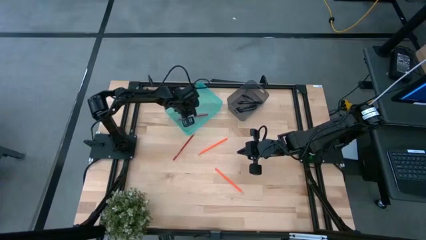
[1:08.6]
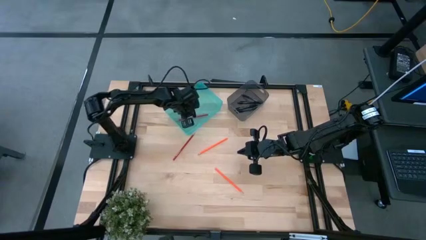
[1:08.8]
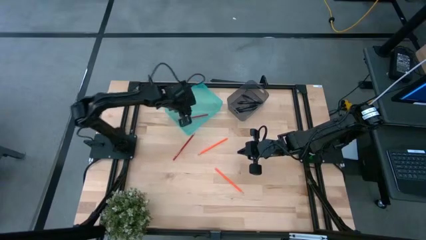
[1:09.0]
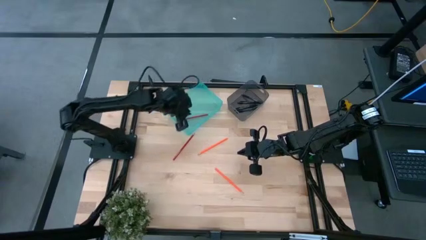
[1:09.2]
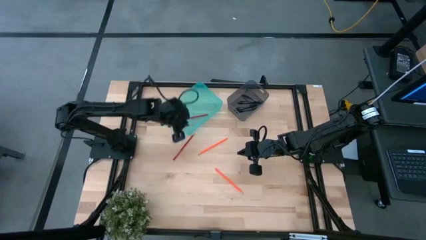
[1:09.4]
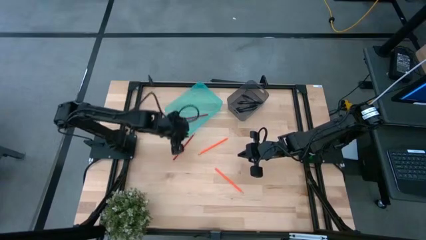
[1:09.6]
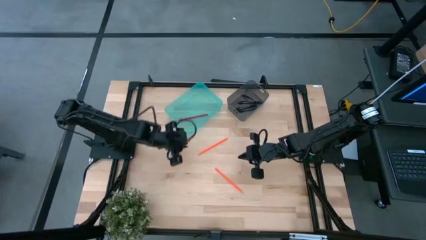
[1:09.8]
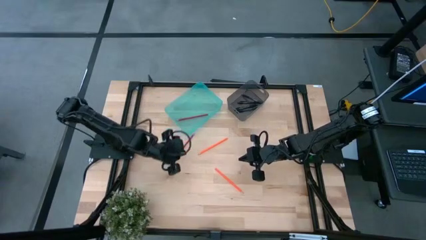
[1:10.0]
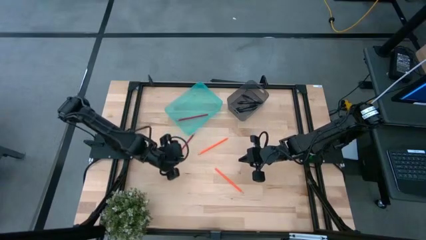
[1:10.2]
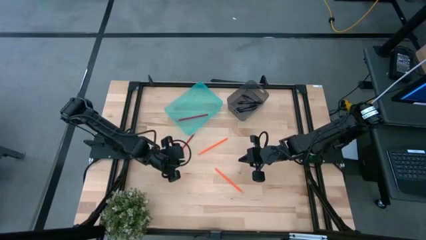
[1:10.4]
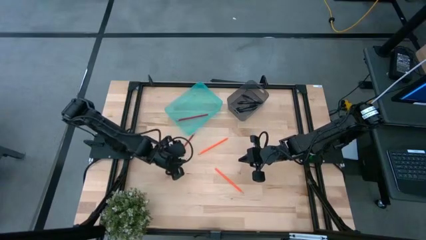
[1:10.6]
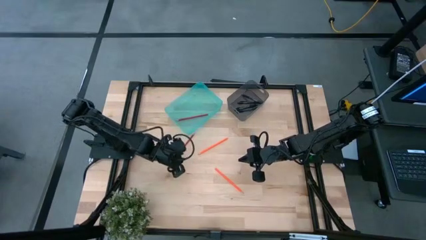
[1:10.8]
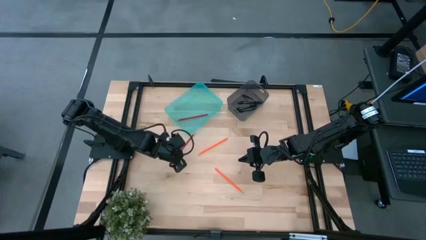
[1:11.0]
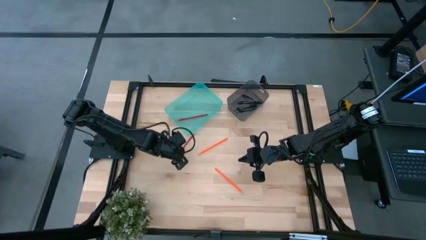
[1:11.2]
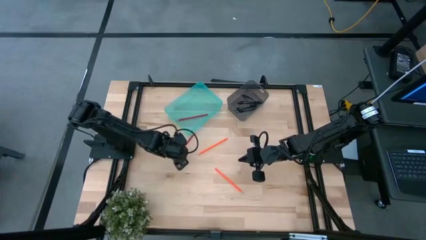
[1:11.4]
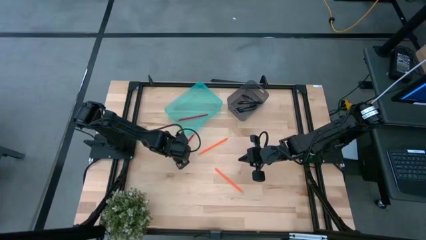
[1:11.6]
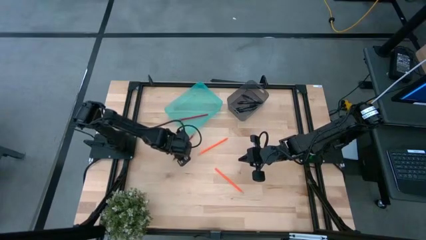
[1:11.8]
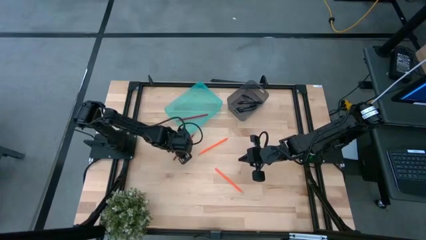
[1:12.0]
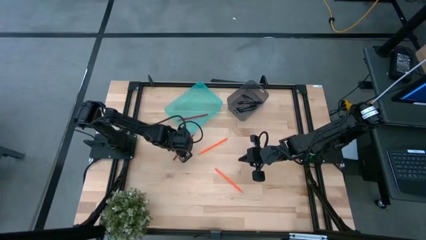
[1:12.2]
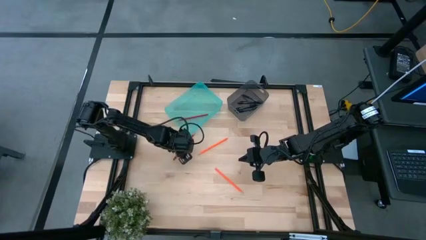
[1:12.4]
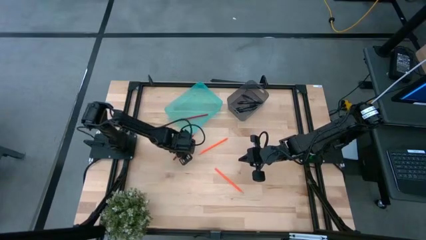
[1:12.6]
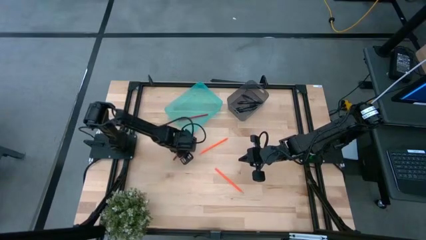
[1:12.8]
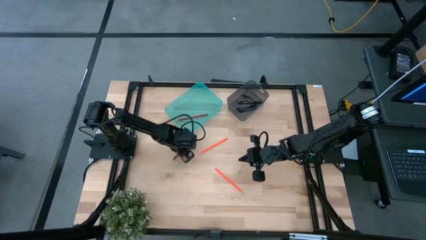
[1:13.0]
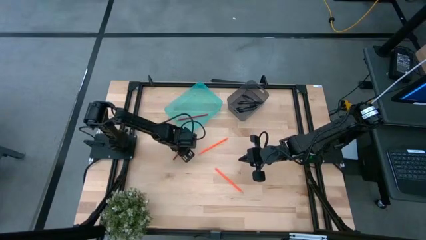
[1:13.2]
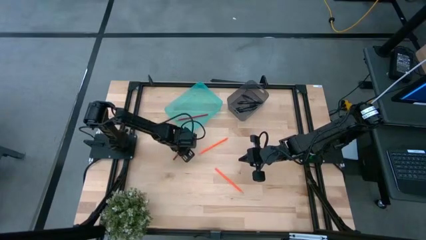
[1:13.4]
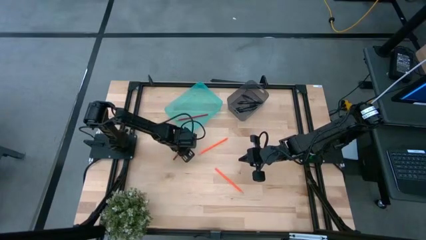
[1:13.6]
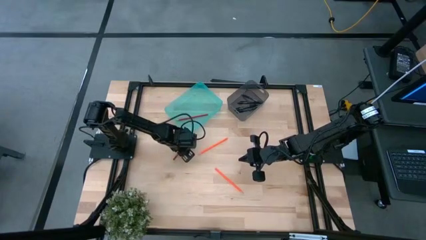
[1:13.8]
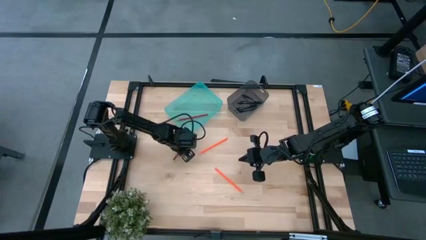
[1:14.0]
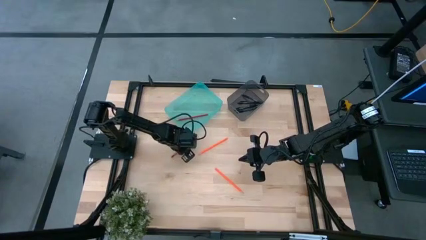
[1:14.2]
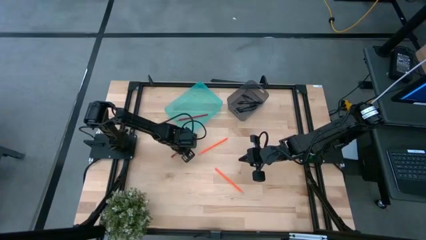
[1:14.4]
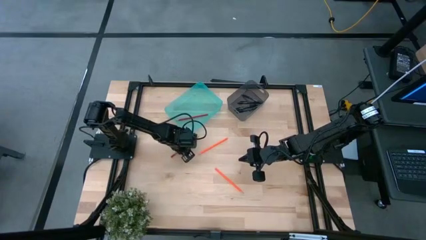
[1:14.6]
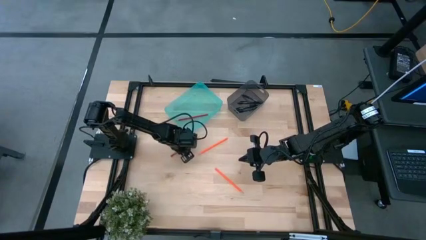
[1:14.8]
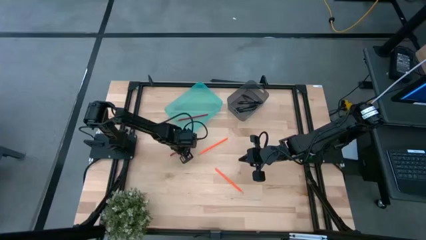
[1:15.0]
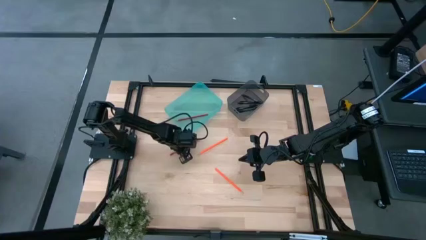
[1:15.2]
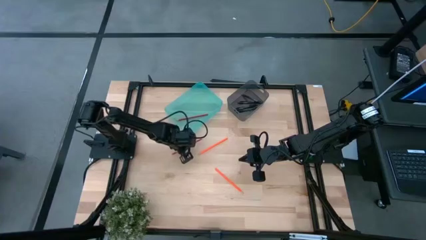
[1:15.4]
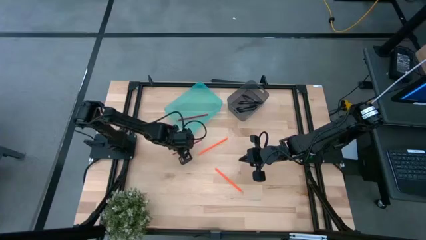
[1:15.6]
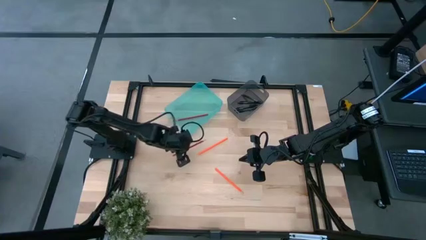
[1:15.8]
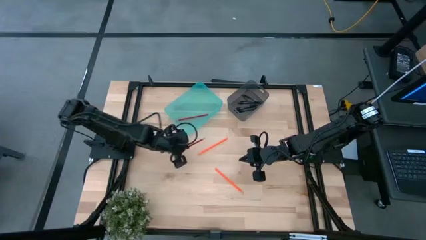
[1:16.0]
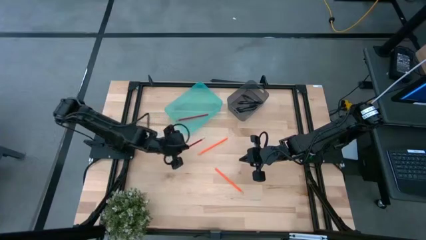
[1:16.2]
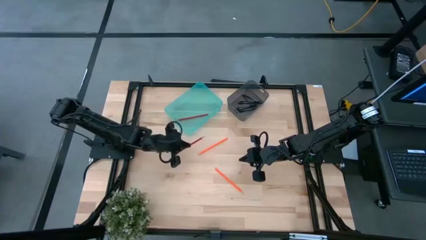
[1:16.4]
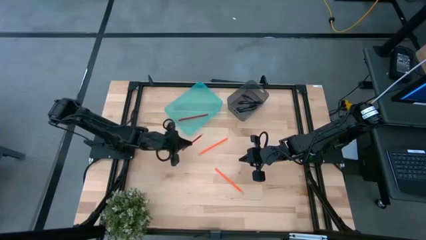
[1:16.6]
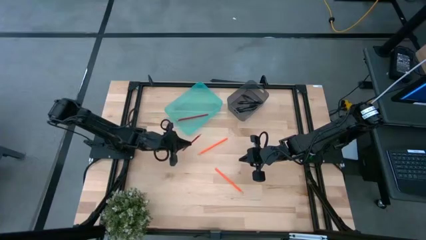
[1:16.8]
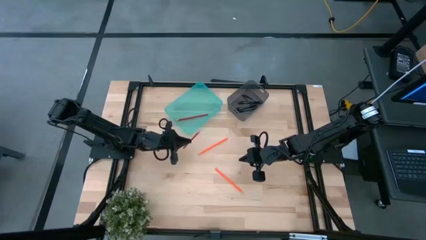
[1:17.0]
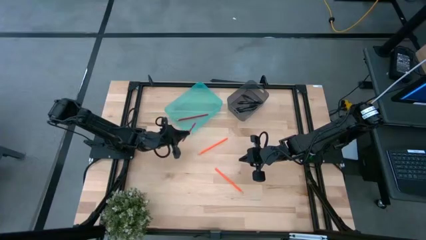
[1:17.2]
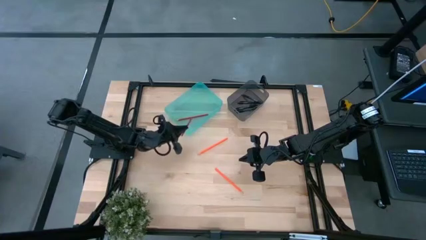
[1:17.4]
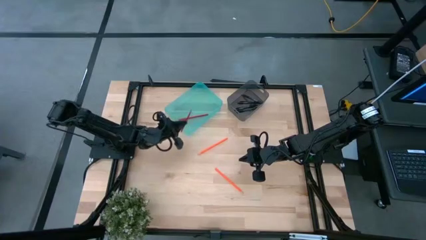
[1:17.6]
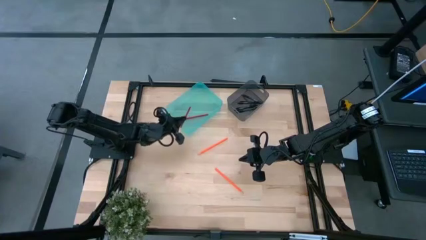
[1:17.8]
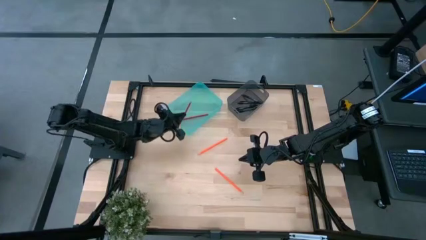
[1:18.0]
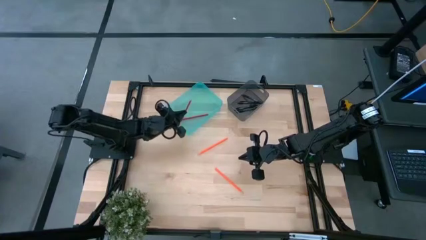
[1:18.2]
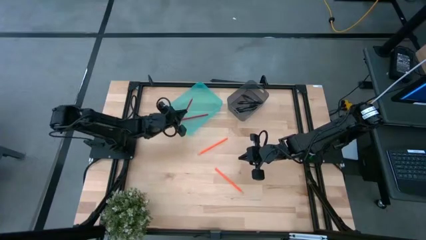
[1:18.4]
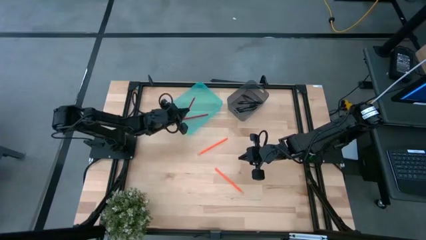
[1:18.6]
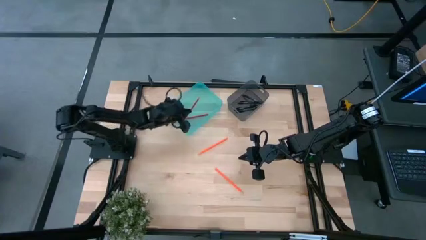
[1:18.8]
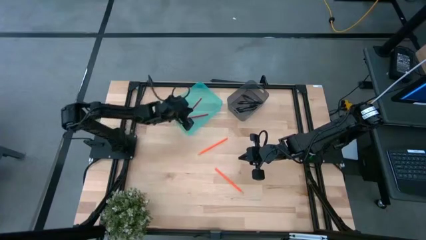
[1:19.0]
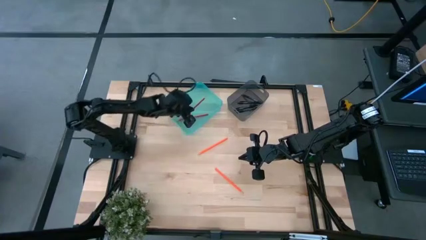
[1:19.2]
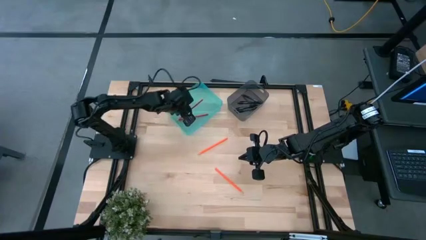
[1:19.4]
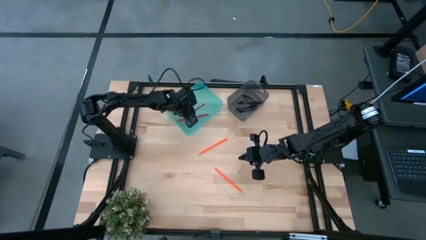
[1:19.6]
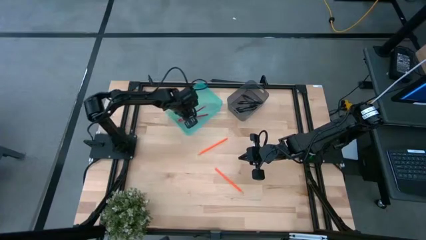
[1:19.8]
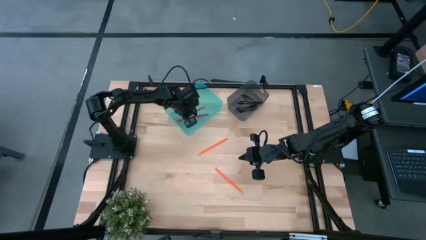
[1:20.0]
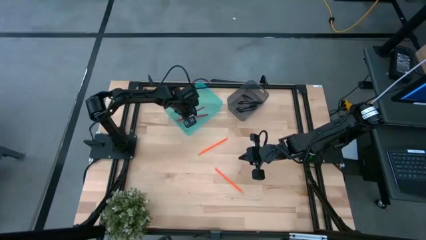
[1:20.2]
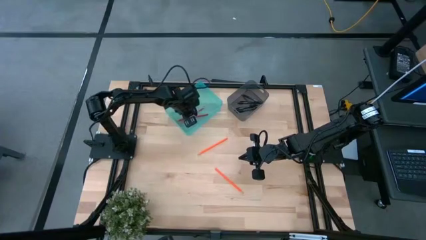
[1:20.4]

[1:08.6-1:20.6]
Task: Sort pens & pencils
Put the red pencil into the green bin

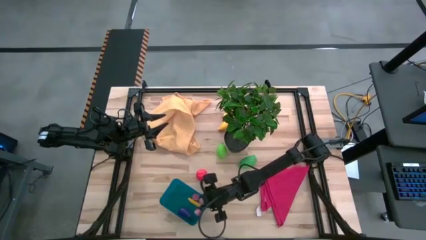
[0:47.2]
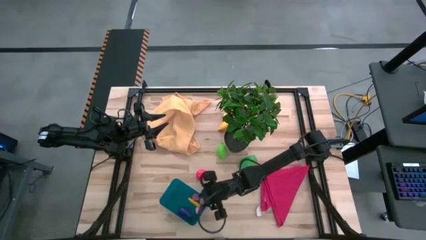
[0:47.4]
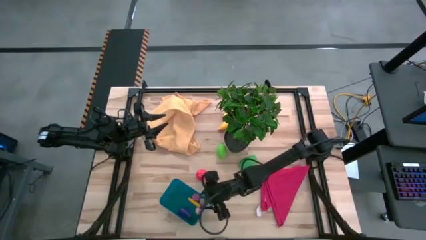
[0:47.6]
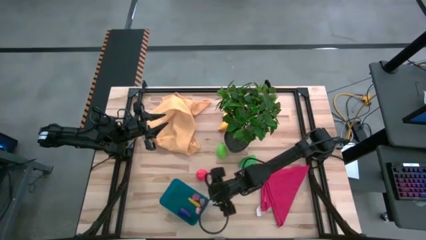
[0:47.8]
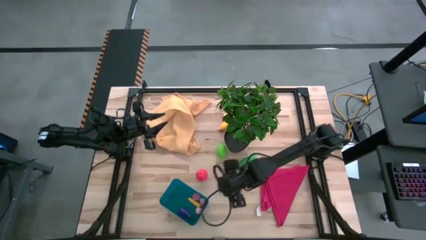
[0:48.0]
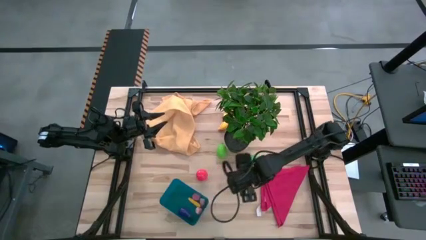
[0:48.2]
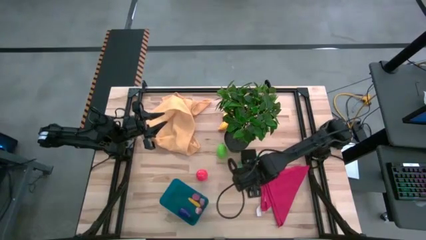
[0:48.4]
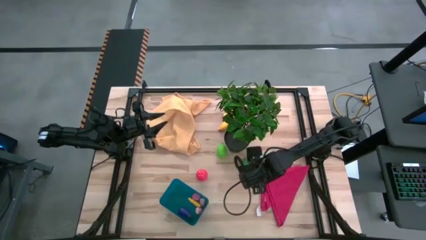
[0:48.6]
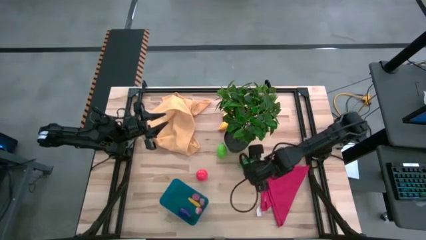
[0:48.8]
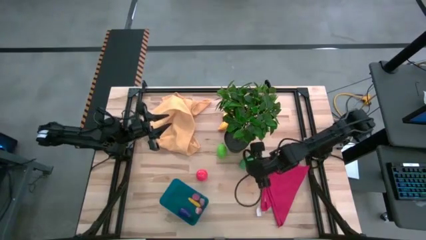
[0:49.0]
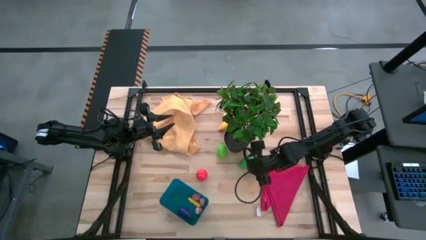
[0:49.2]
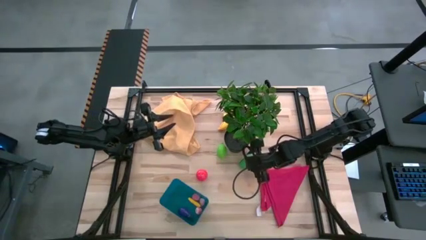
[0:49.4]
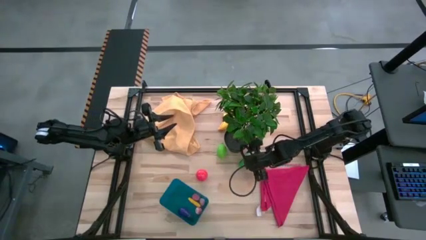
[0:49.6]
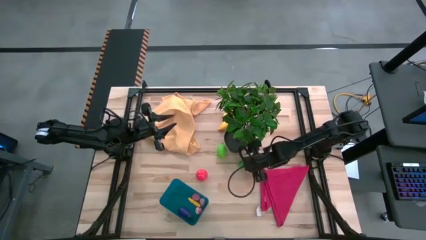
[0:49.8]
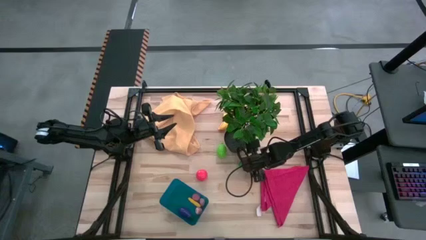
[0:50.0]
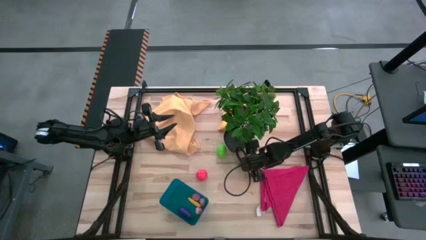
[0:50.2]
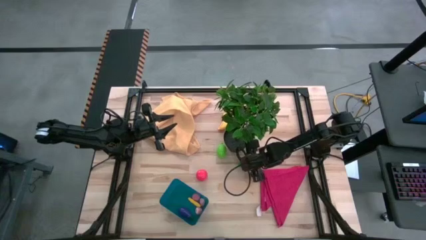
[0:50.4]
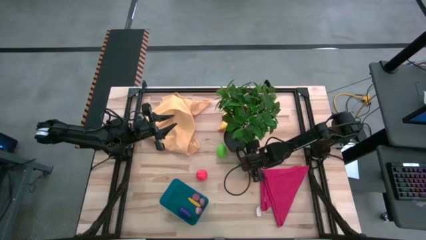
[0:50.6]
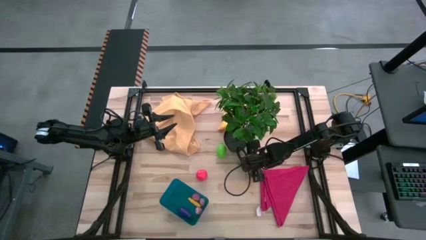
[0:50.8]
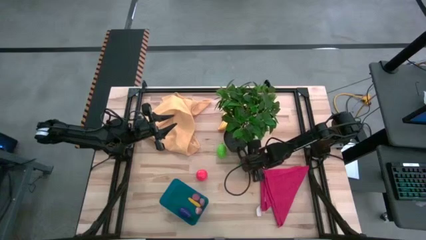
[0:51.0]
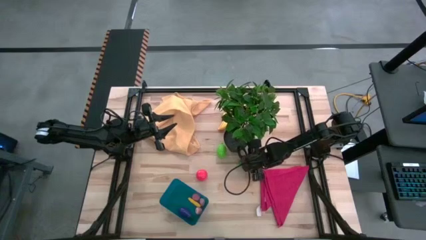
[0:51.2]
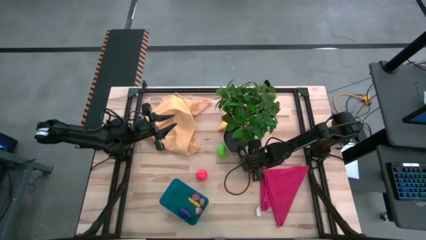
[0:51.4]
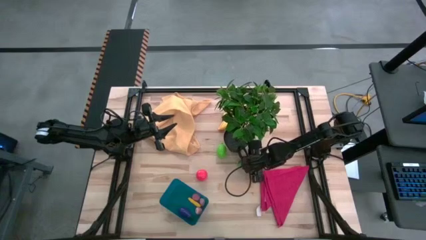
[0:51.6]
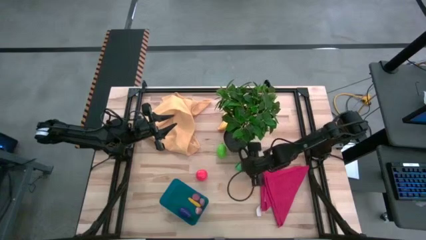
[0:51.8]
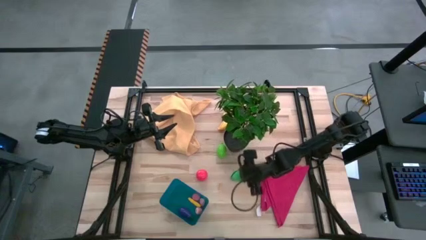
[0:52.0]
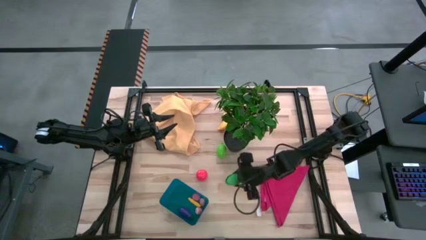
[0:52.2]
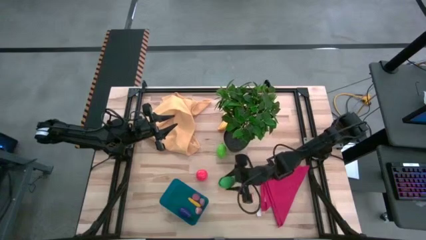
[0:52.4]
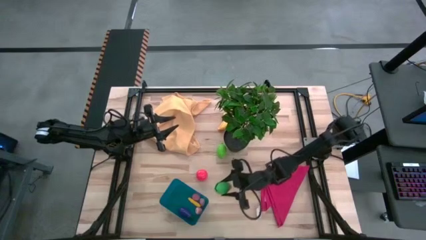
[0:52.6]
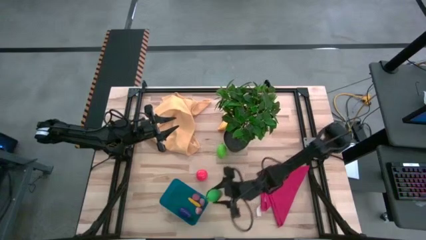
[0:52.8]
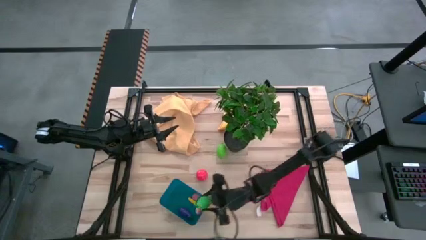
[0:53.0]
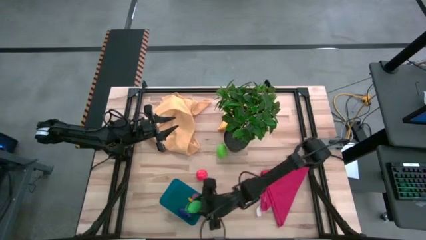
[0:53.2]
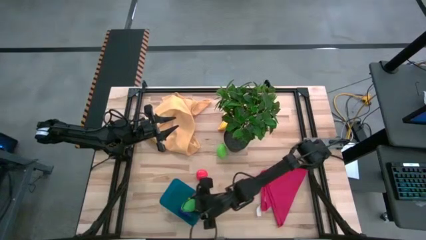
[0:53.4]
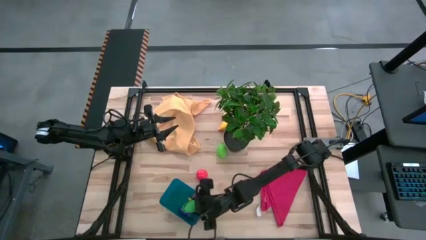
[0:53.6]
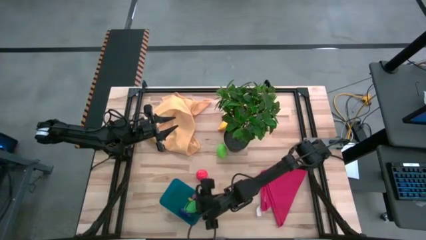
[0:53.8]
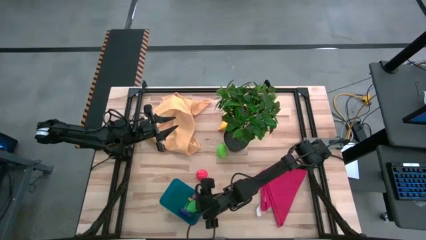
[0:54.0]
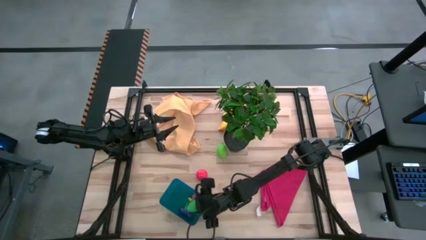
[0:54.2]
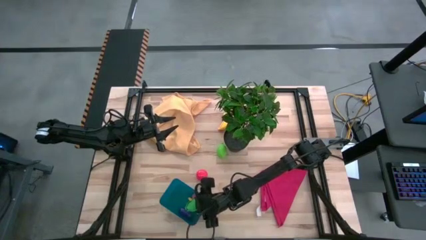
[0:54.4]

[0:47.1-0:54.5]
Task: Pick and placing Produce into tupperware
Put the green corn into the blue bin
